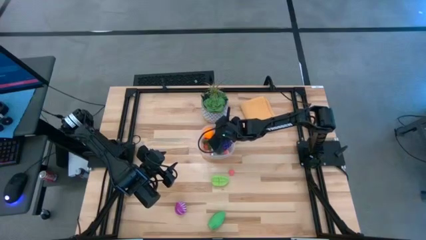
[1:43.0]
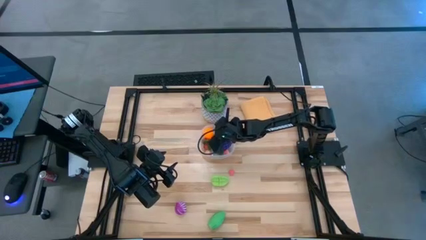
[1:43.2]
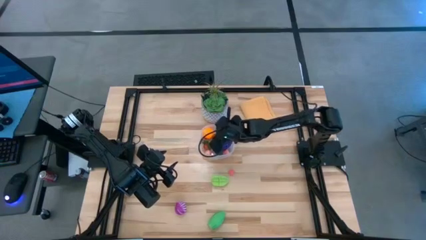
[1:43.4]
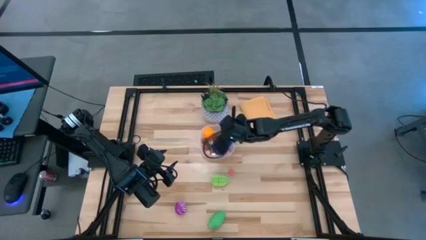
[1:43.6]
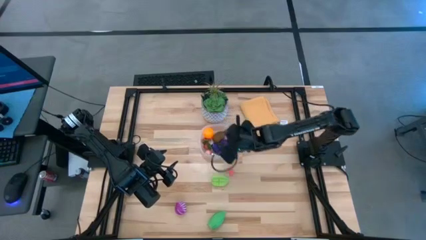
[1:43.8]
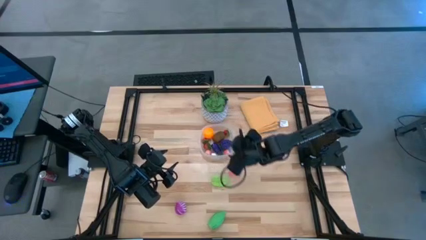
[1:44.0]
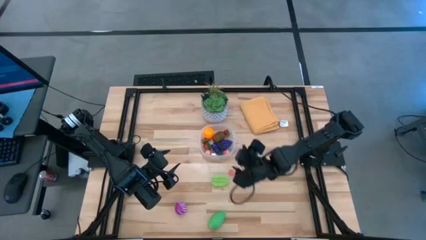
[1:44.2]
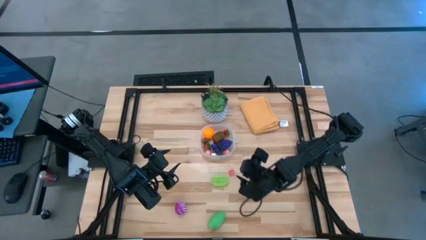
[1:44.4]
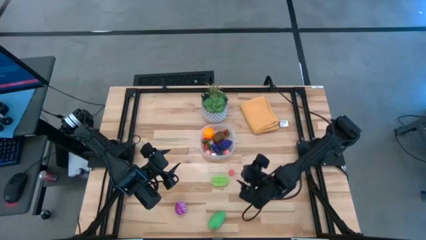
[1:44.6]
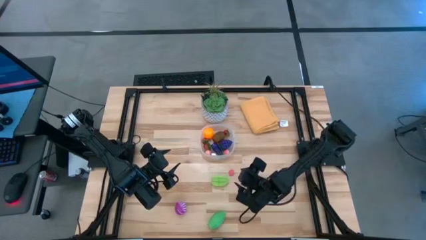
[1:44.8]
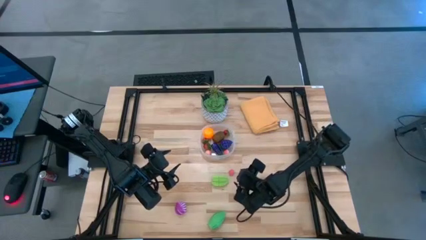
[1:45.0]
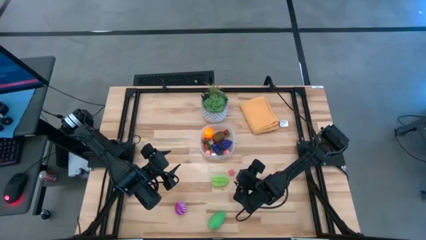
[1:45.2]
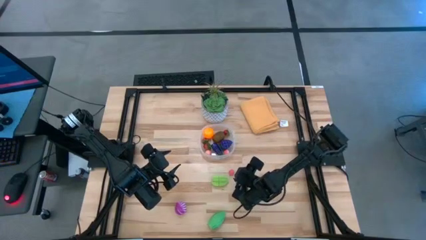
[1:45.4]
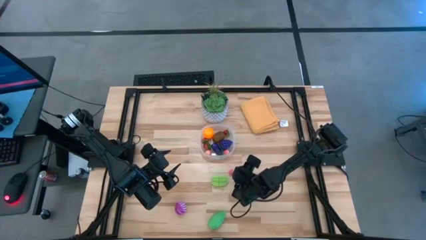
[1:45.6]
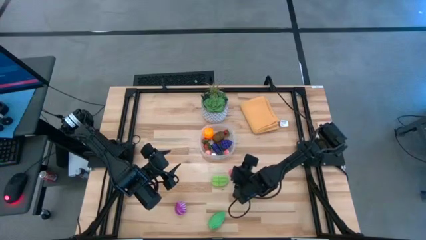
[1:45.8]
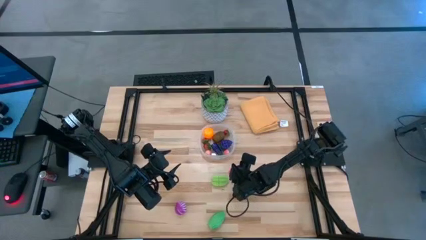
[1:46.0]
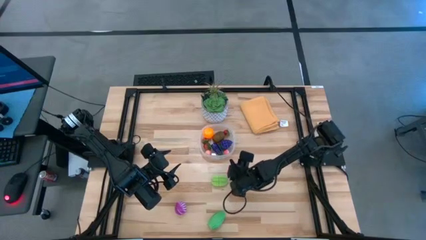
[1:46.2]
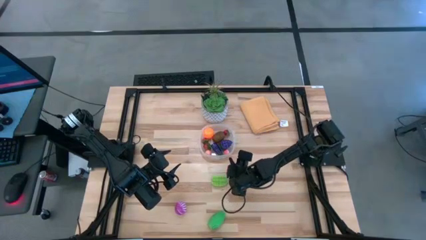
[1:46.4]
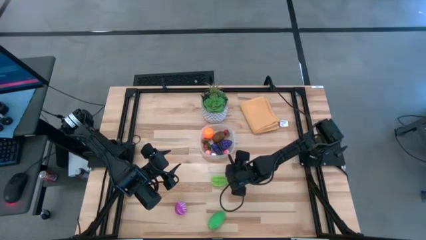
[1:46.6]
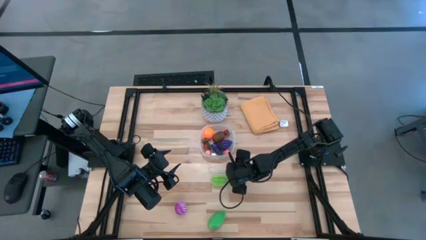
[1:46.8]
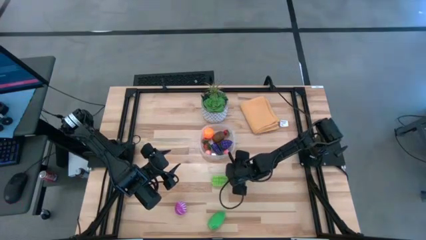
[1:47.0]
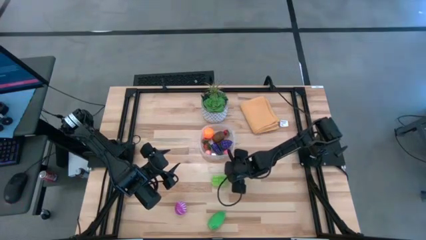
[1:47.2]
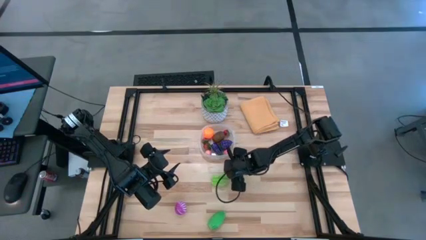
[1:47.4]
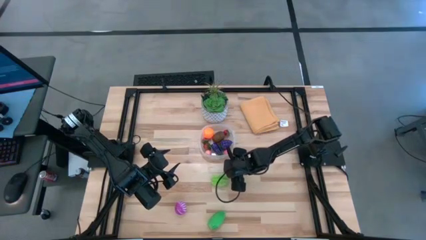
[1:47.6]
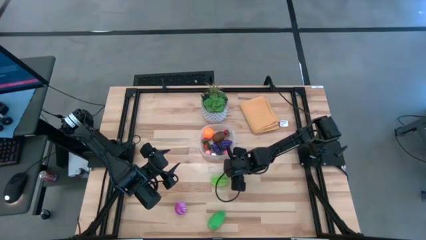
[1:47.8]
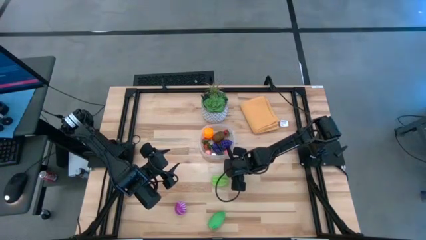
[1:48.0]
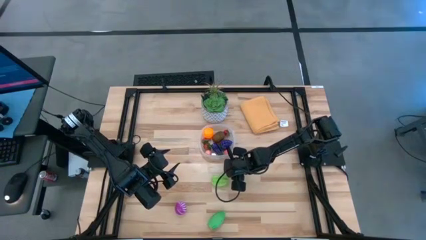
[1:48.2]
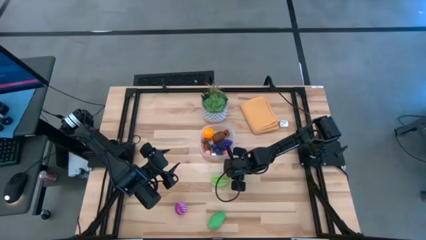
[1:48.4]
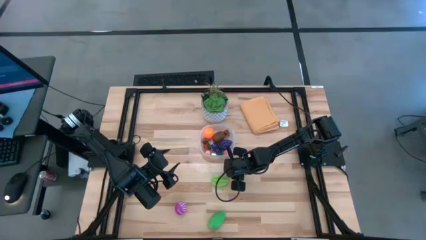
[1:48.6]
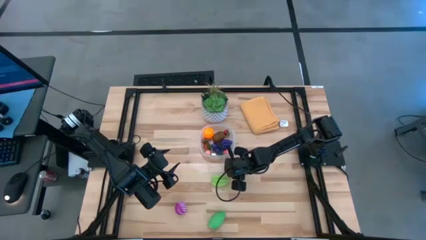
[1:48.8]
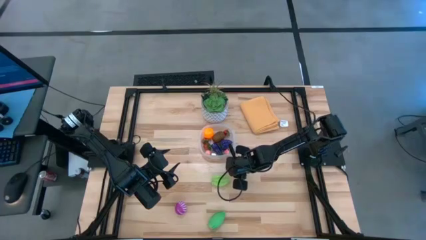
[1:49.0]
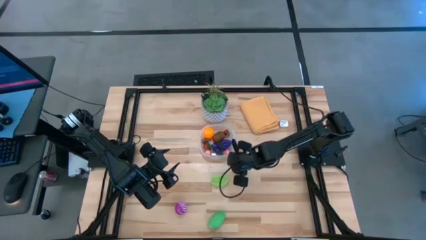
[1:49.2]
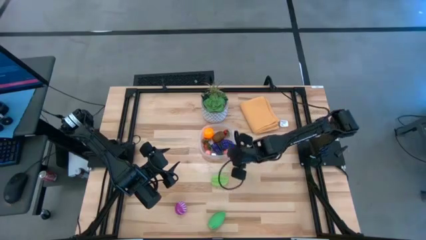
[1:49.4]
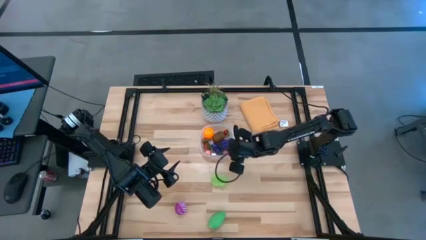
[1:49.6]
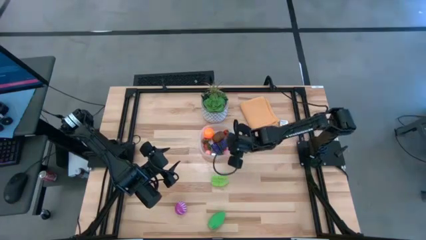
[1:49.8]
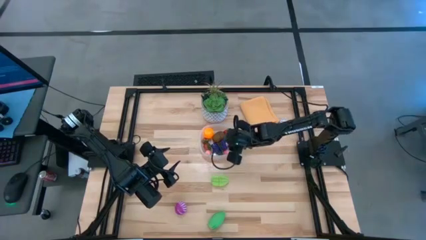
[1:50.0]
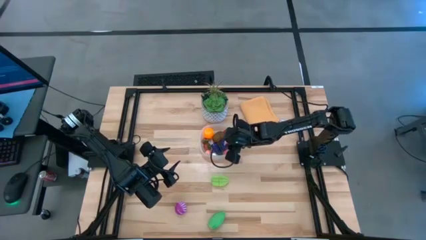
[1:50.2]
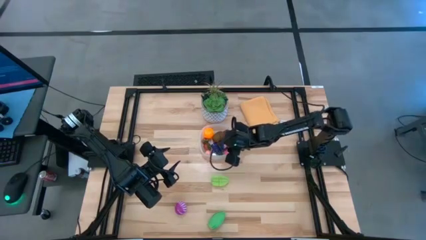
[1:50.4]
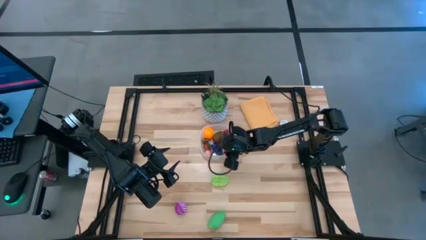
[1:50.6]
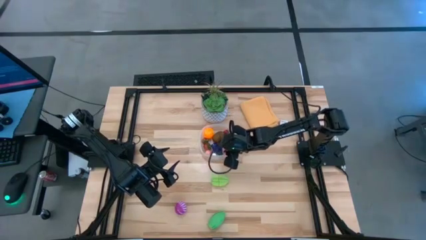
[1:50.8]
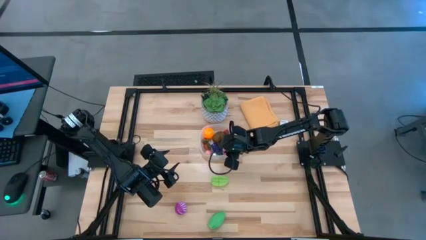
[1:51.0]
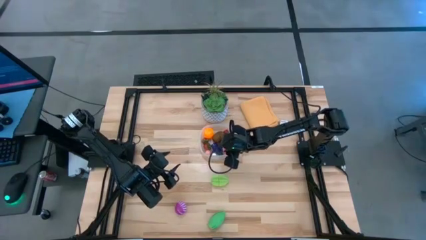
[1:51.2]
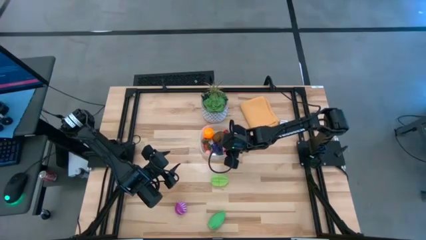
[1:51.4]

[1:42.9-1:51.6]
Task: Pick and placing Produce into tupperware
Put the pink peach into the transparent bin
